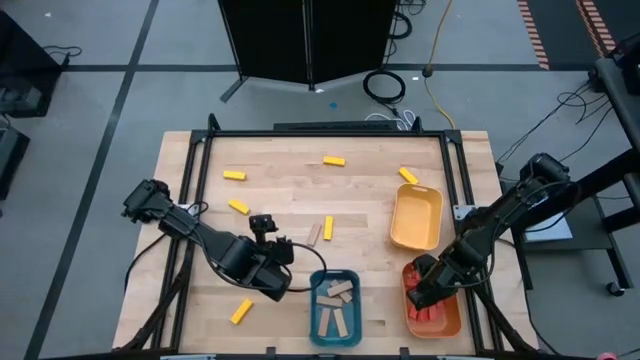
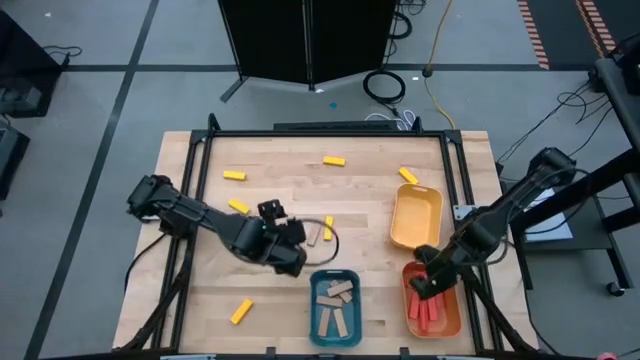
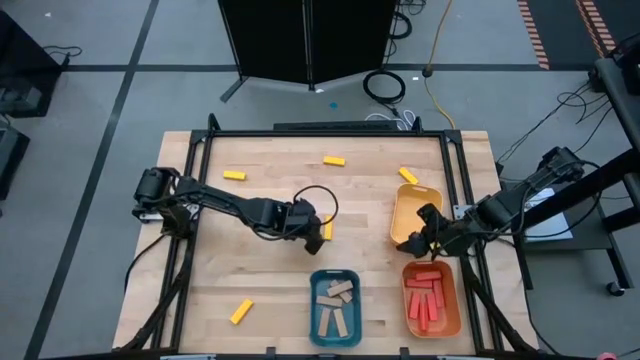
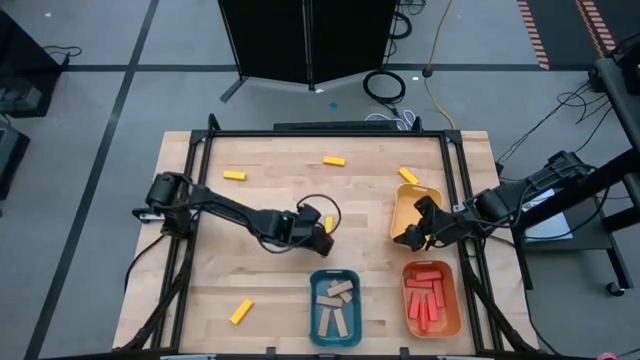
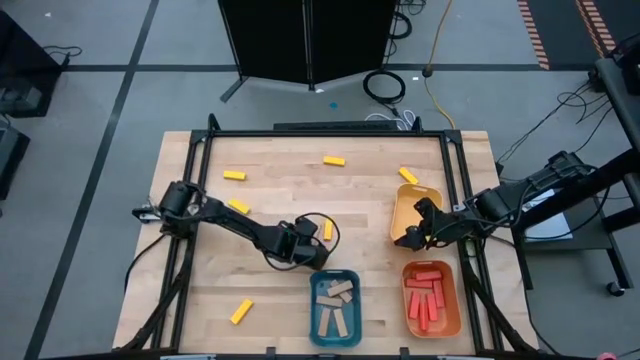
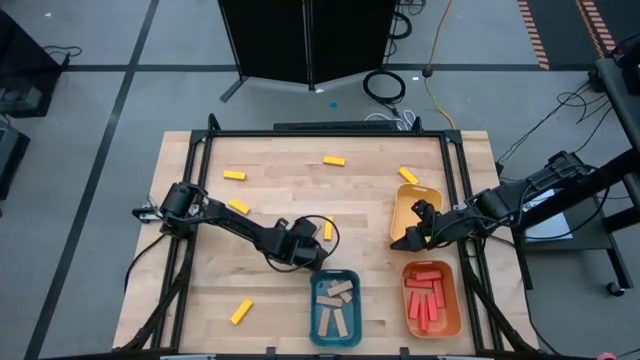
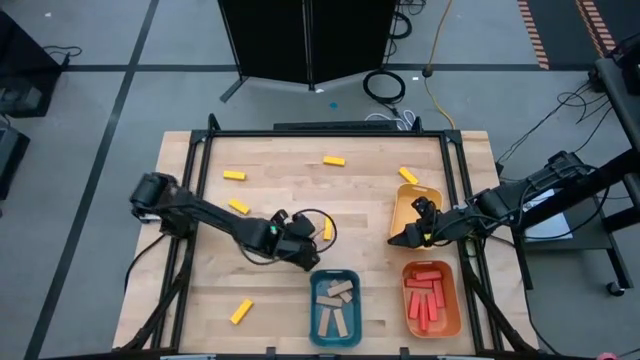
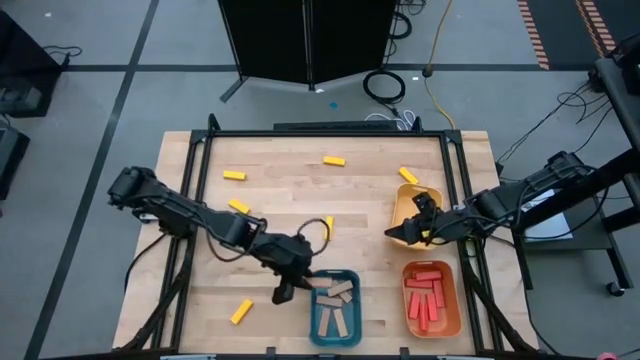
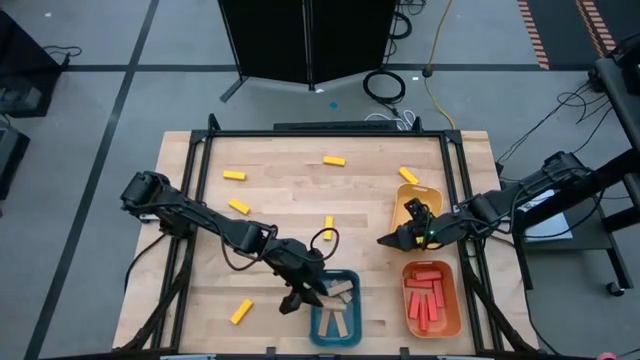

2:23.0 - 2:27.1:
Task: Sort blocks
Put the brown block into the blue bin

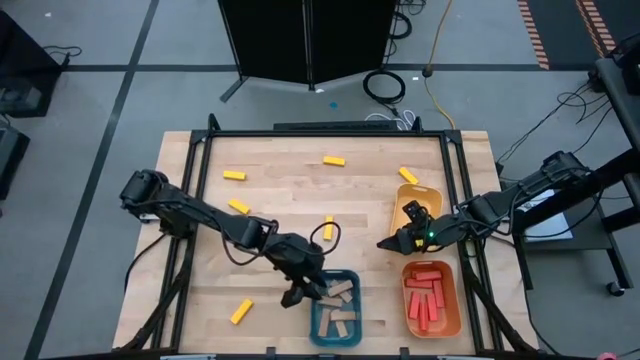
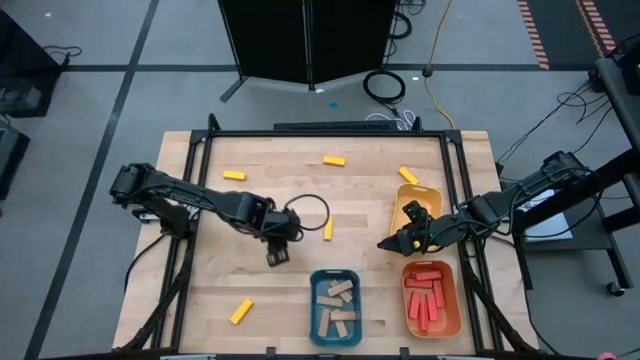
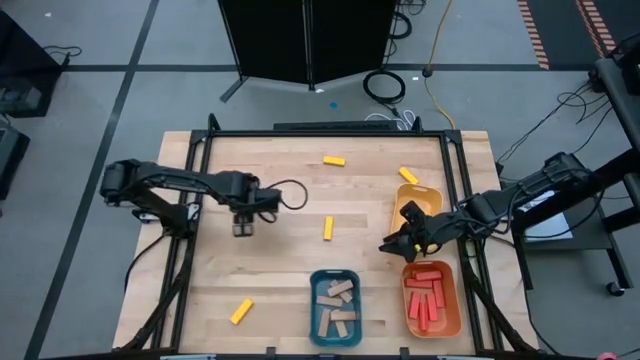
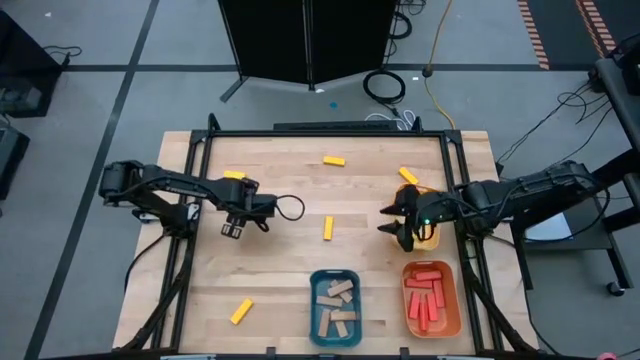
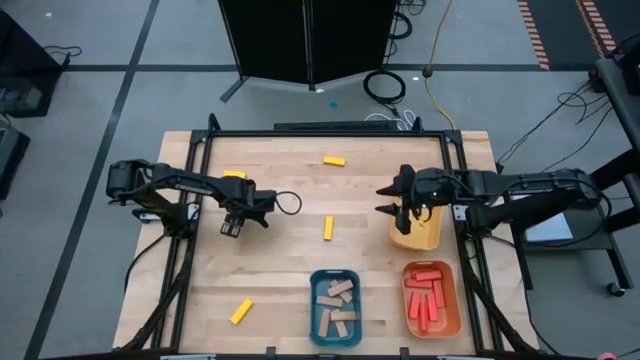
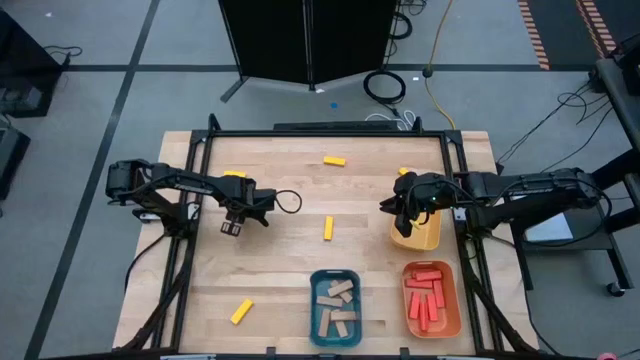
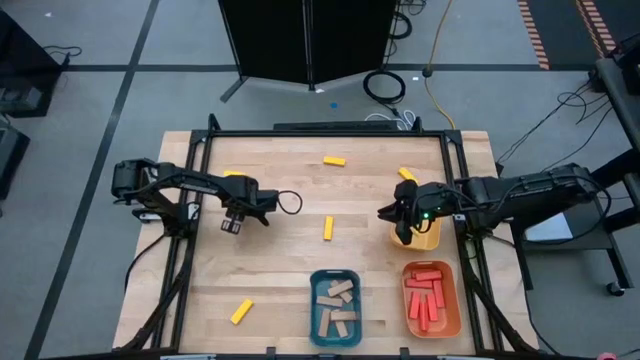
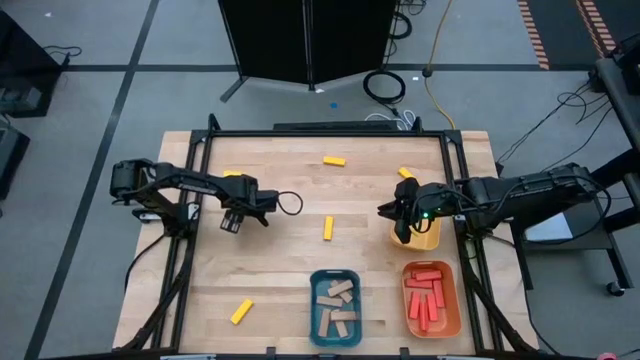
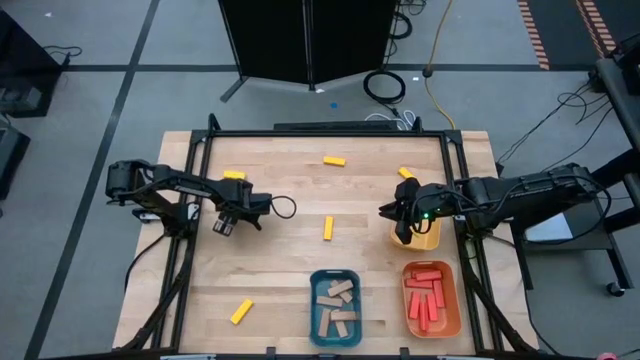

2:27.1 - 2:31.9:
Put the yellow block into the yellow bin

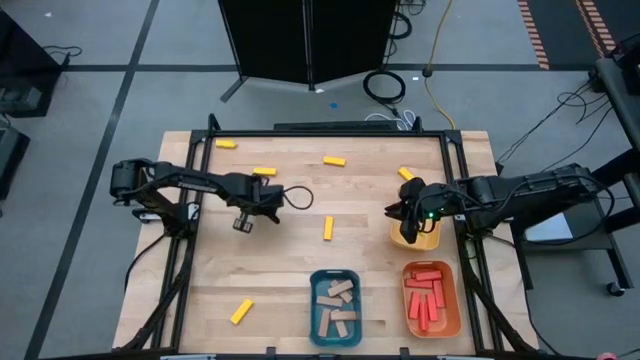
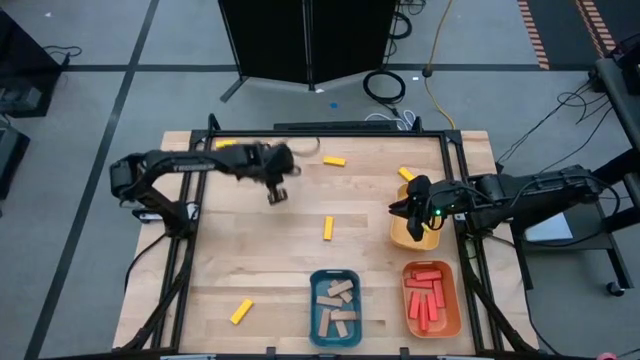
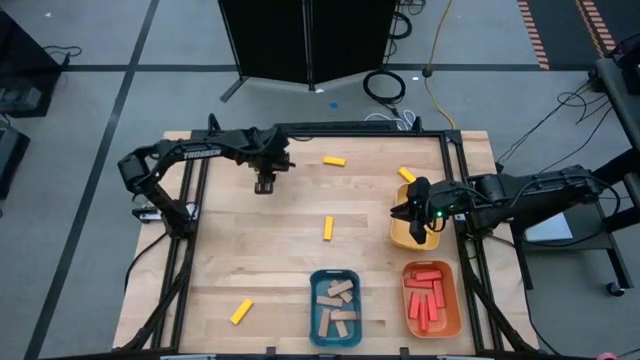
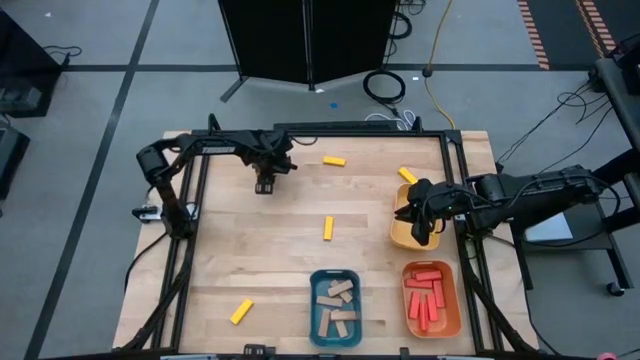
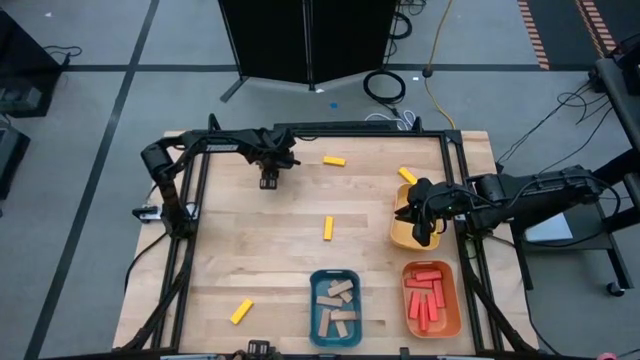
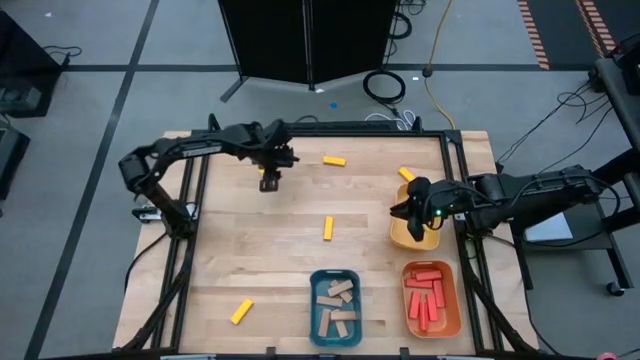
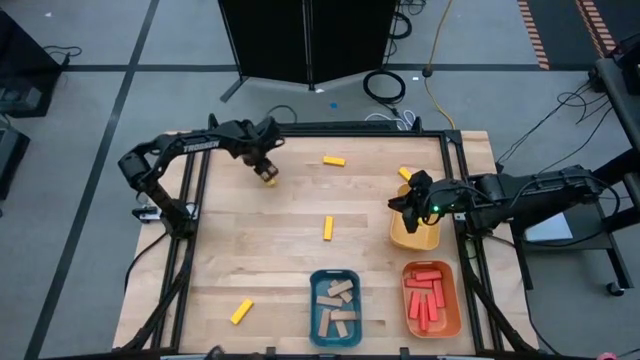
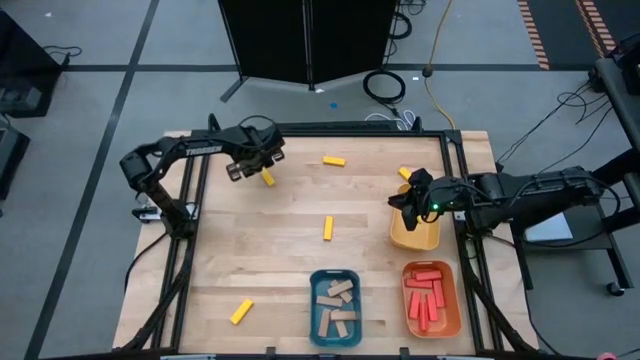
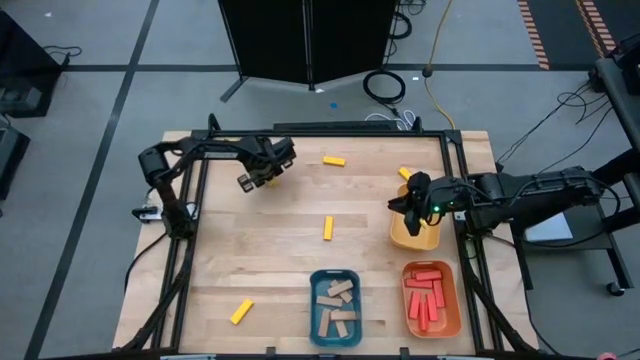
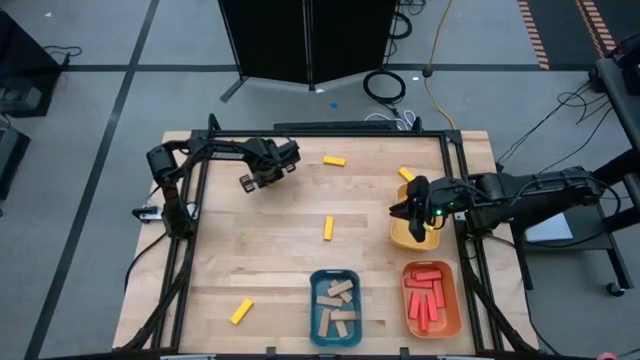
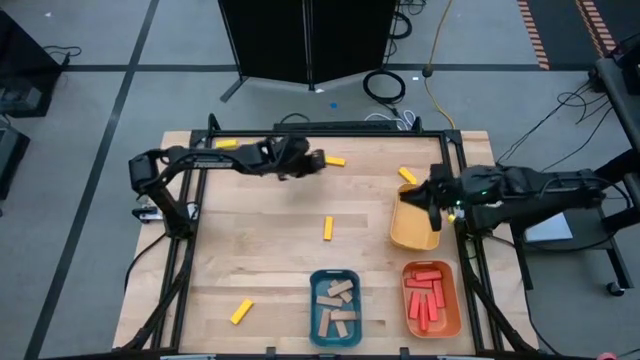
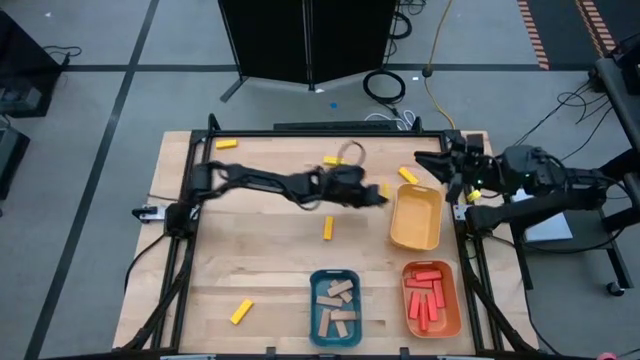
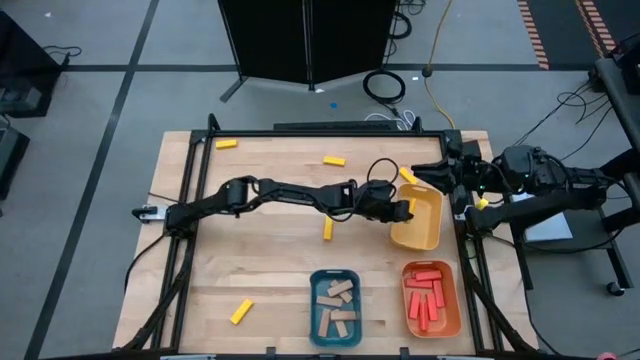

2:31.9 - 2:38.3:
Put the yellow block into the yellow bin

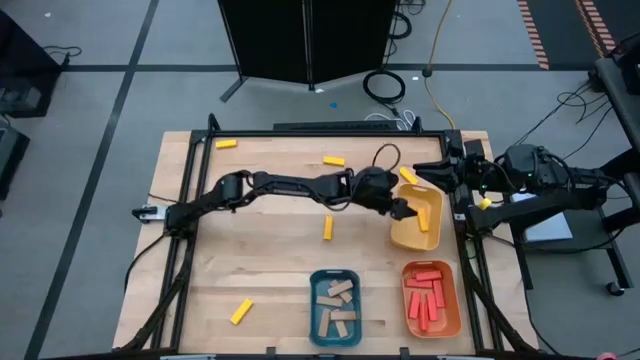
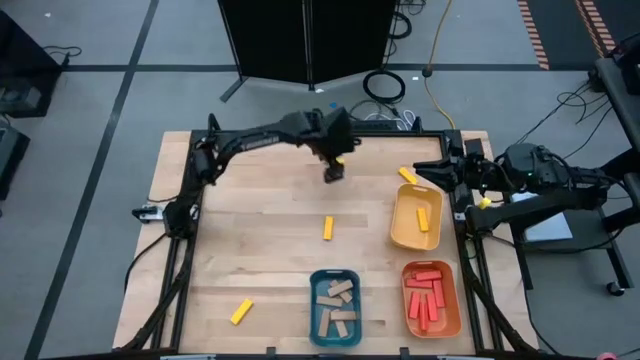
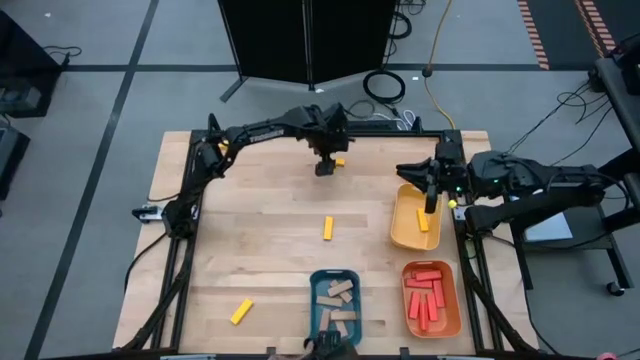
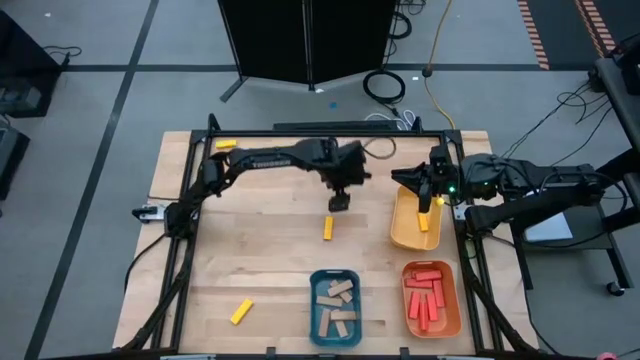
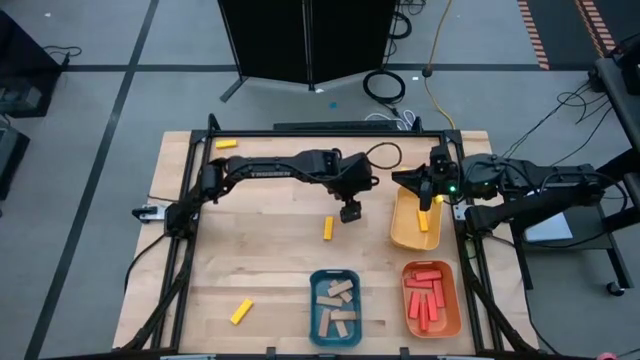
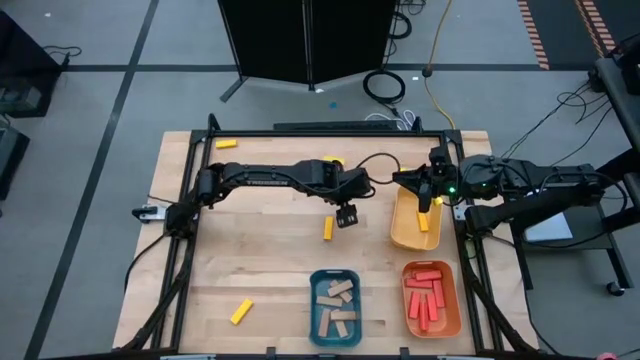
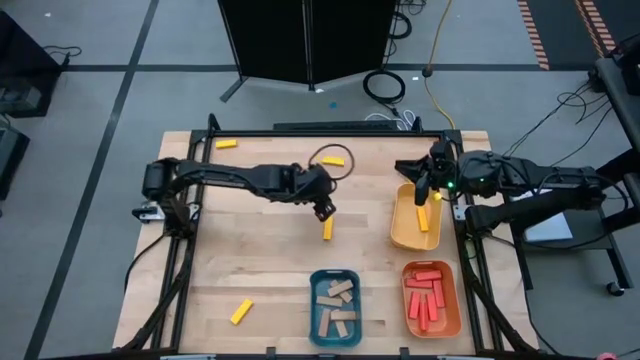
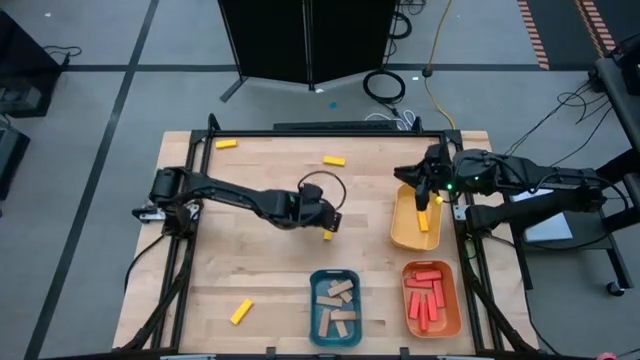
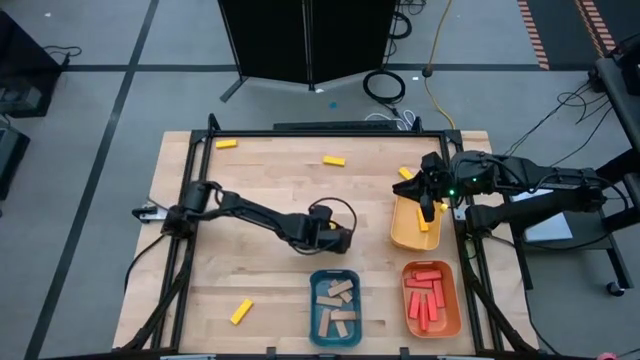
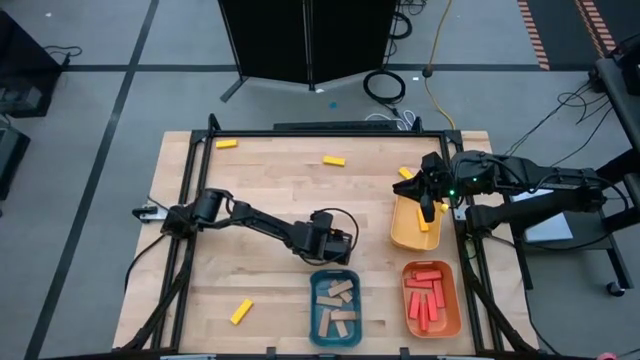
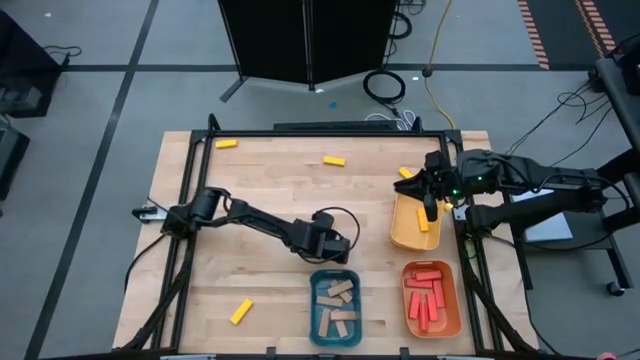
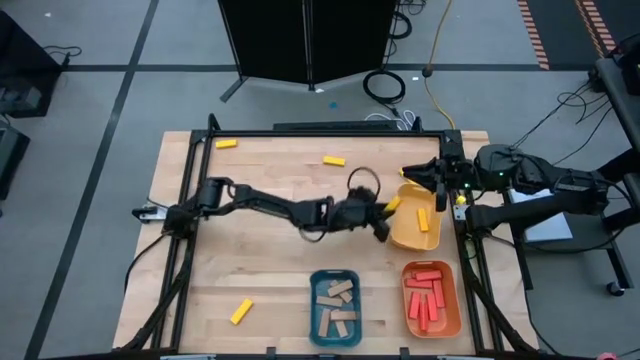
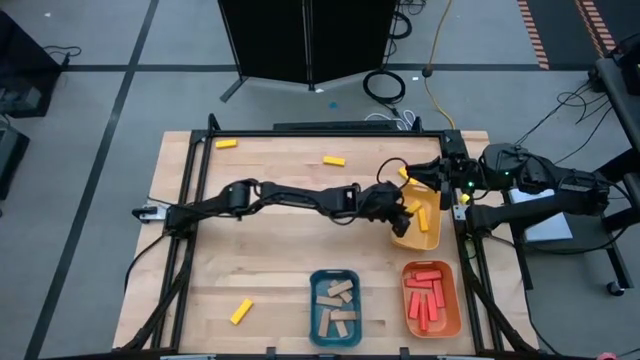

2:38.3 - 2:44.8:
Put the yellow block into the yellow bin
